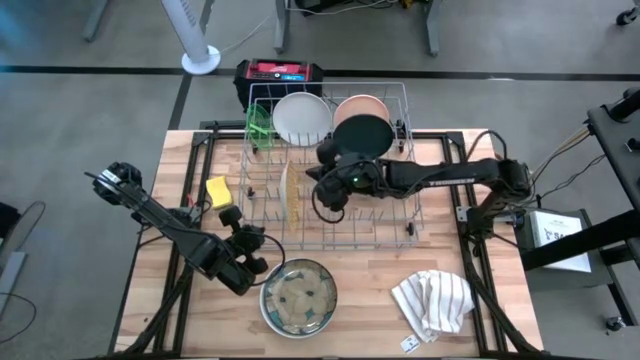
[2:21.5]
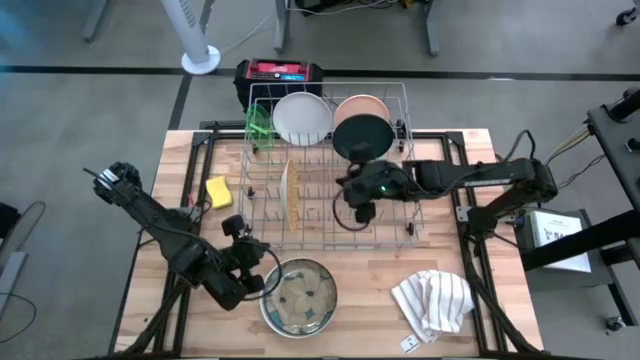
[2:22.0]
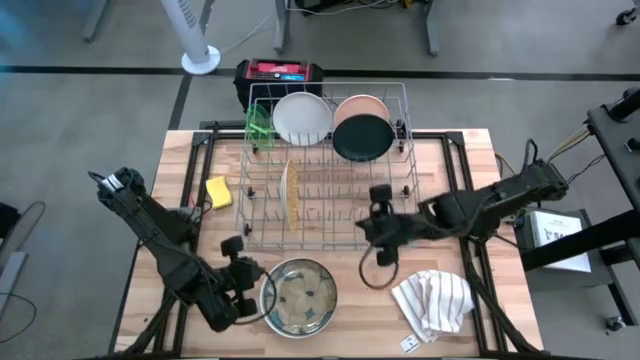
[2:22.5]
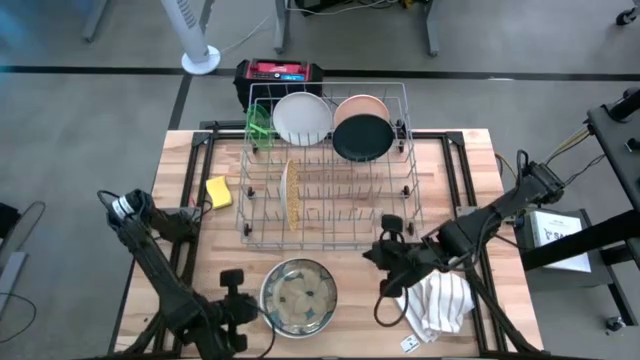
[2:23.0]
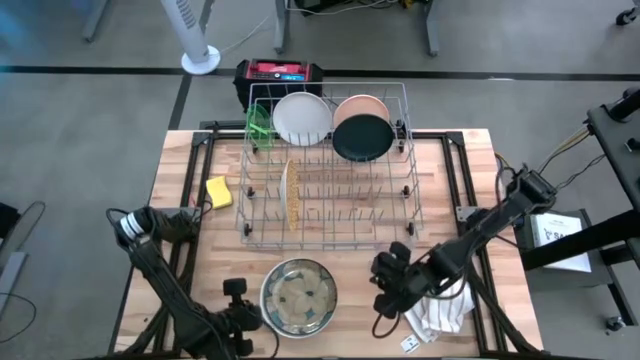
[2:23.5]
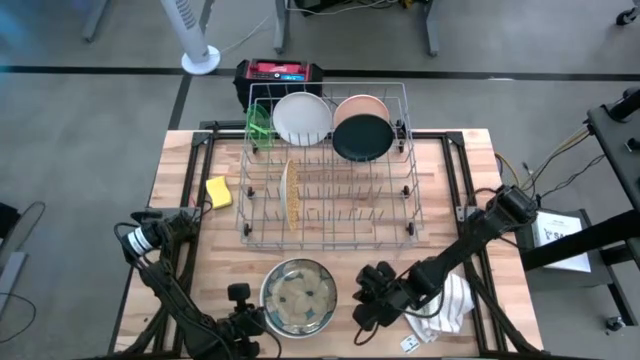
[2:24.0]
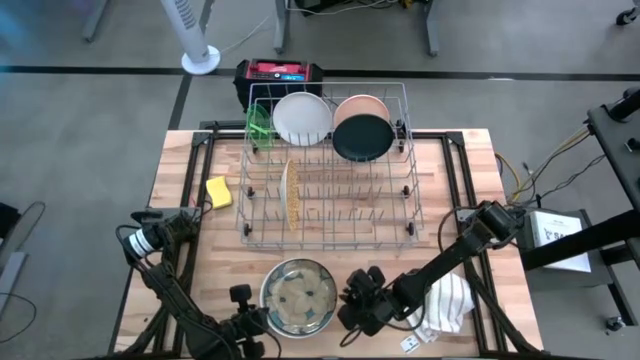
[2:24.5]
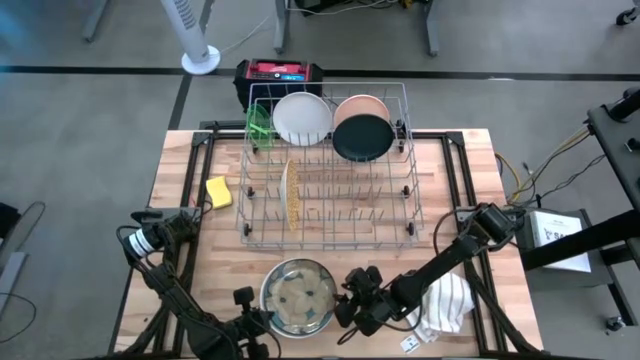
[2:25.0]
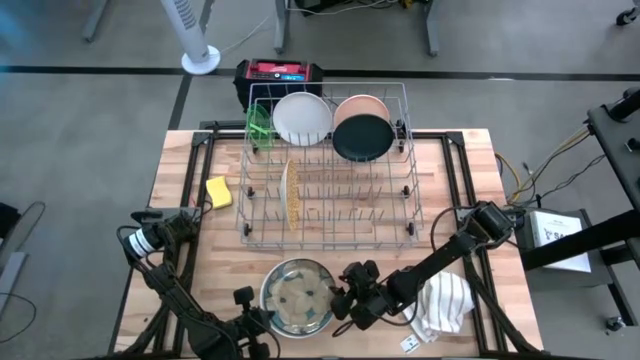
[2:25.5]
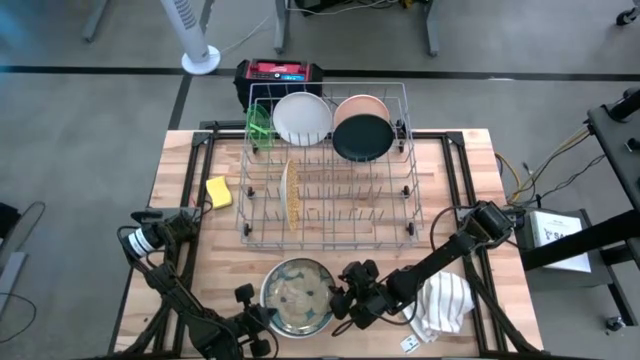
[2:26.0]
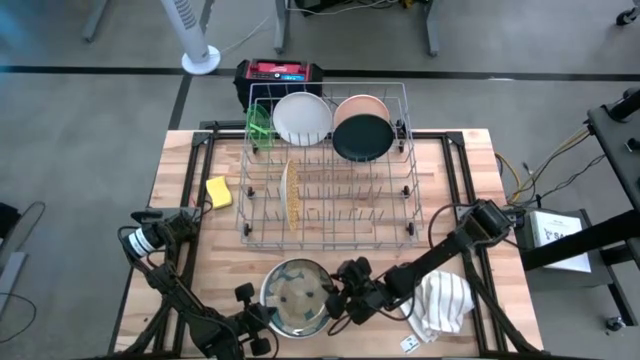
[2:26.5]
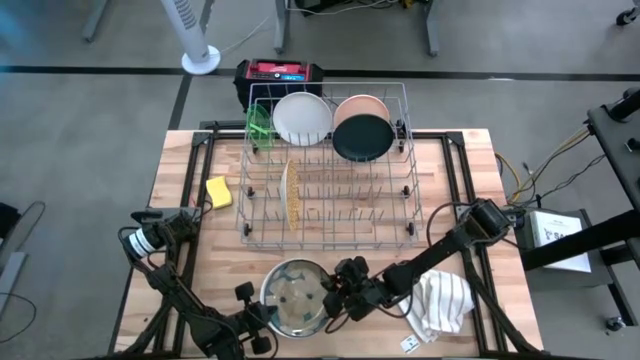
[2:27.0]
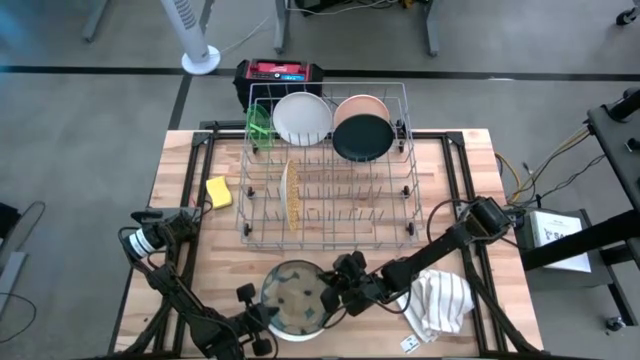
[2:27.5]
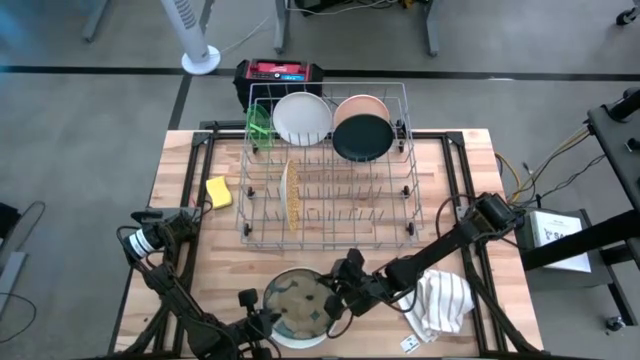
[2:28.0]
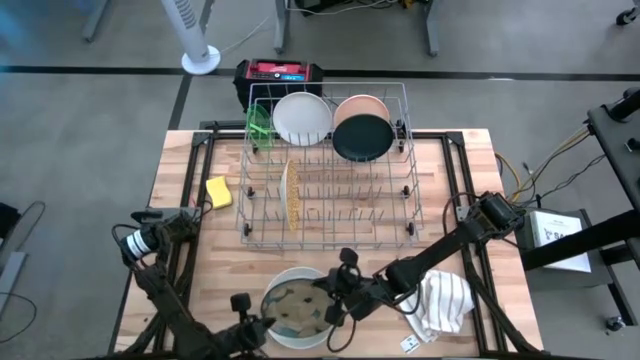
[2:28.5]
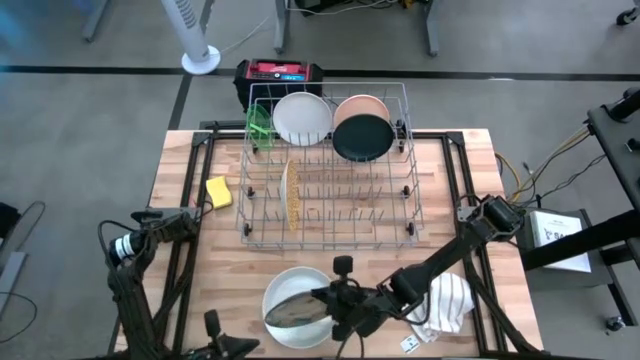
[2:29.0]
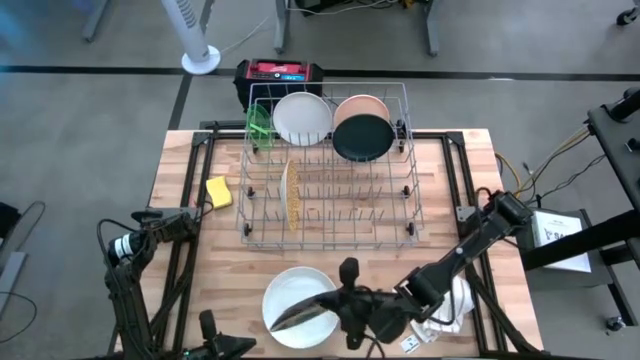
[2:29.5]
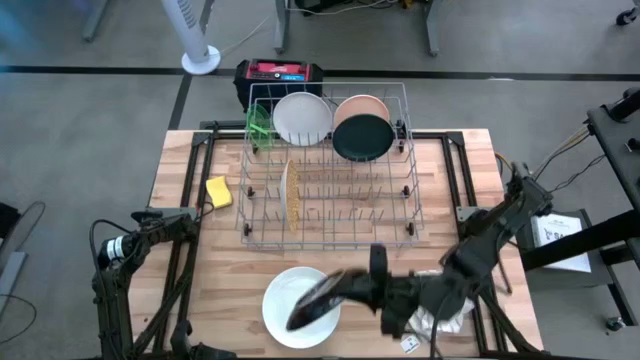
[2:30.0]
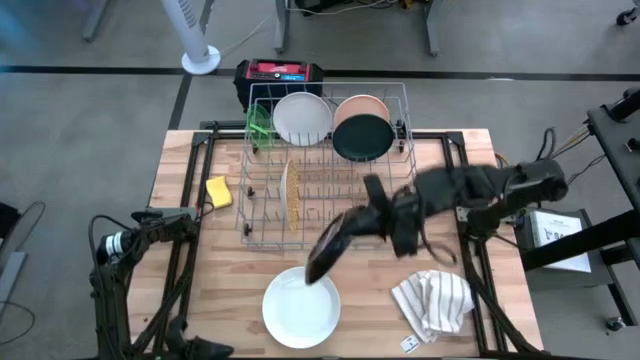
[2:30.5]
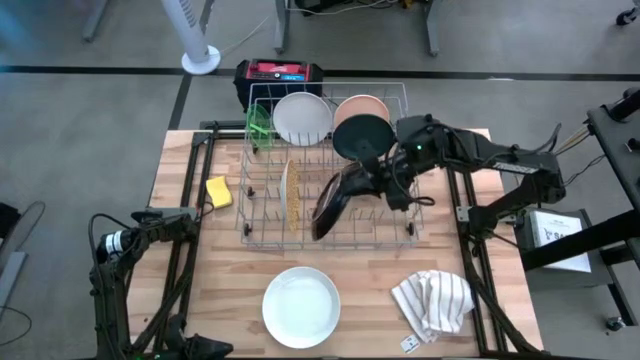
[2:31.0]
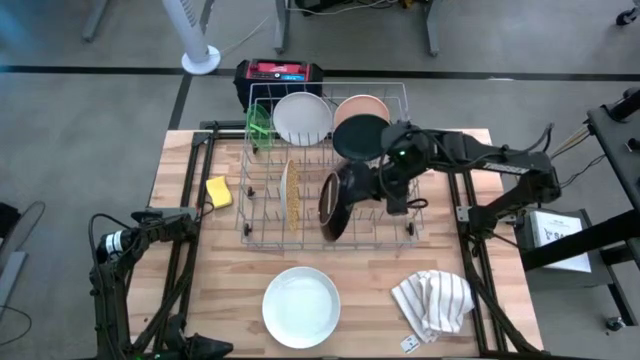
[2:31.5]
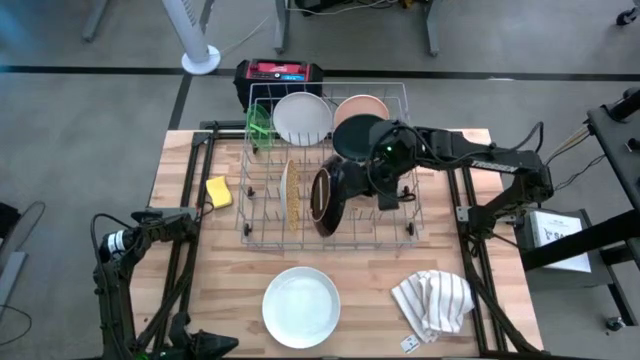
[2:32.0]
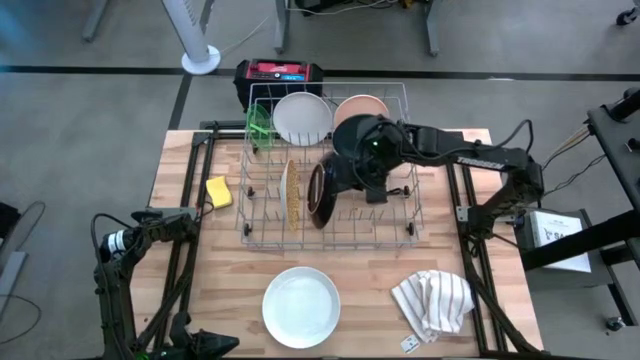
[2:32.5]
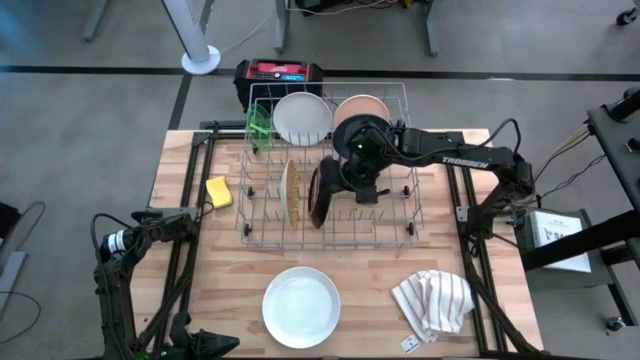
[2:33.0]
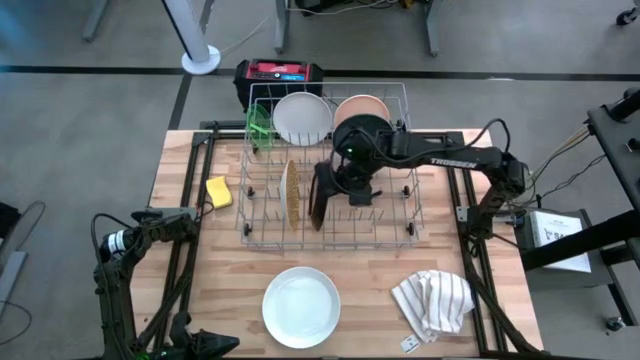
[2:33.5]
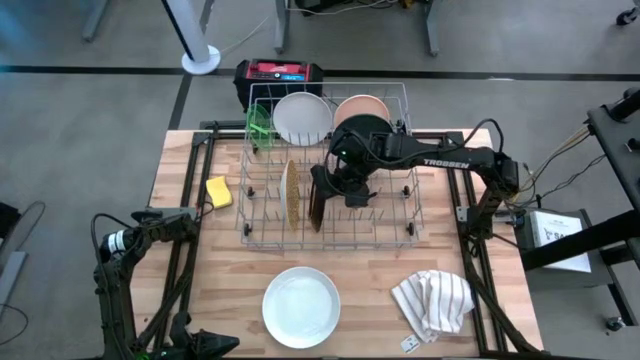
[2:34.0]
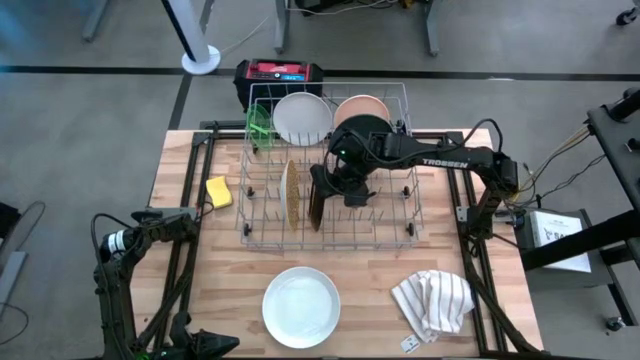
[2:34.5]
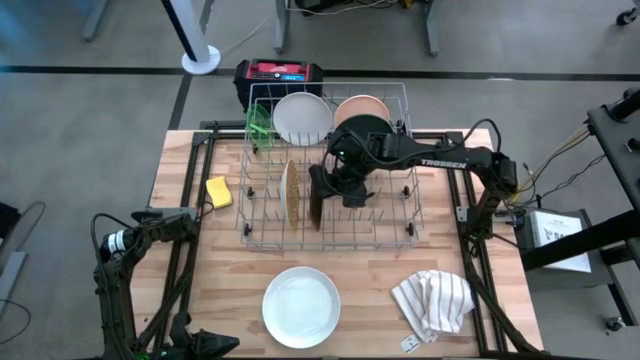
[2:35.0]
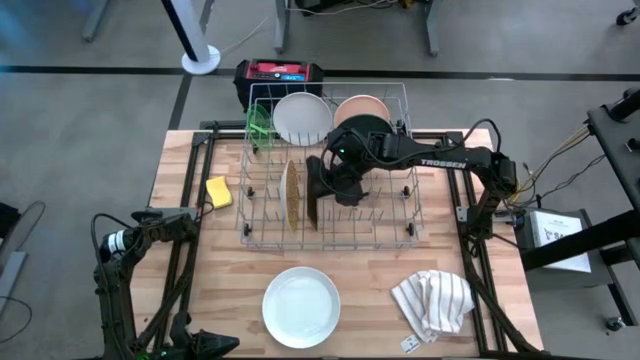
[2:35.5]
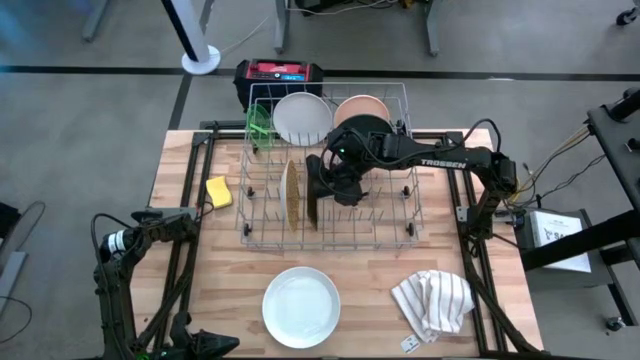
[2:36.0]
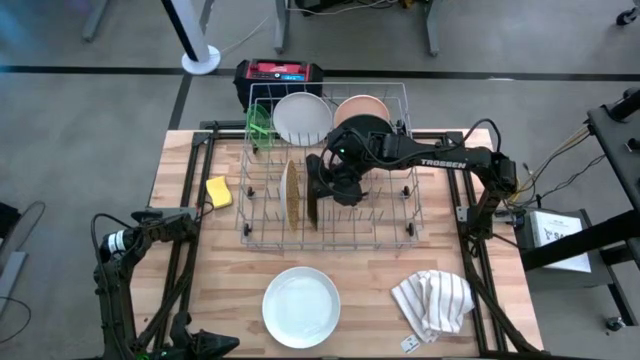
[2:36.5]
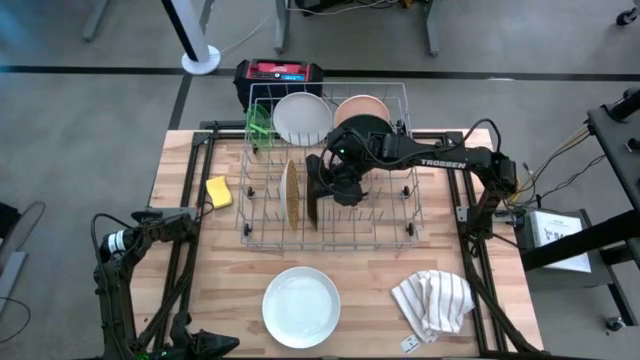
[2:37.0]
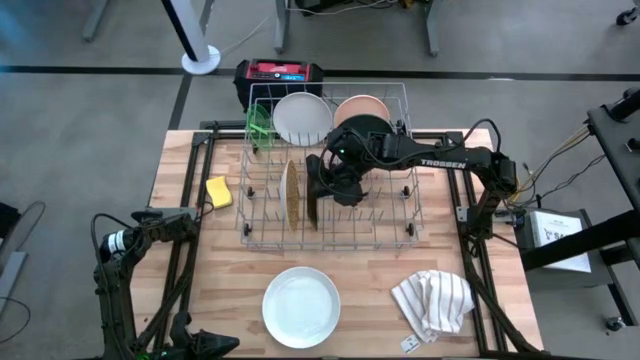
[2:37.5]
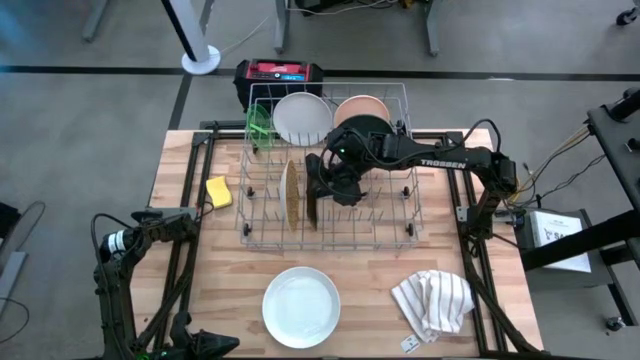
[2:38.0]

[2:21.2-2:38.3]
Task: Sort dishes
Put the brown plate into the dish rack

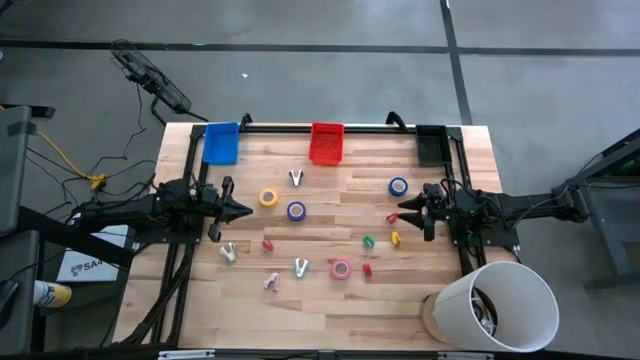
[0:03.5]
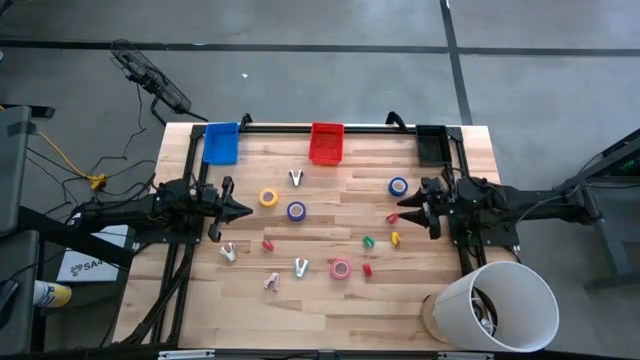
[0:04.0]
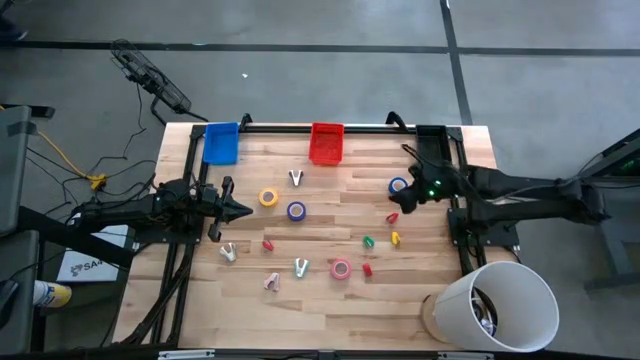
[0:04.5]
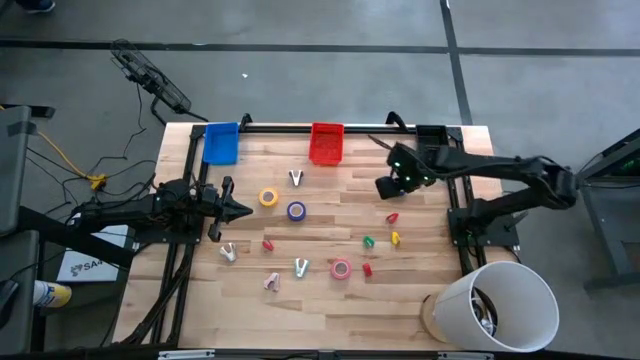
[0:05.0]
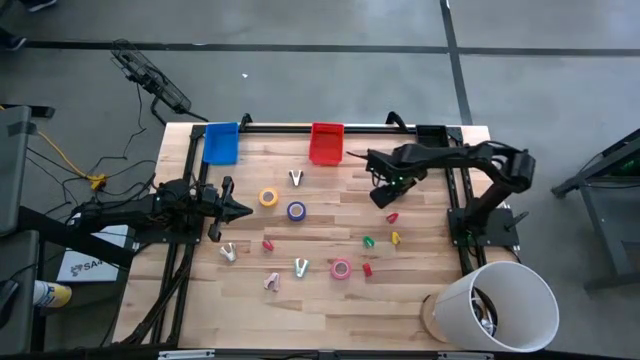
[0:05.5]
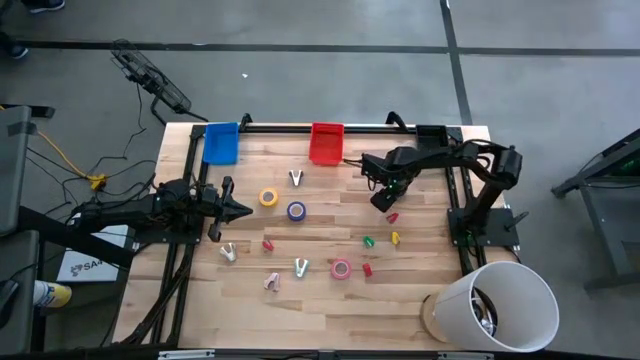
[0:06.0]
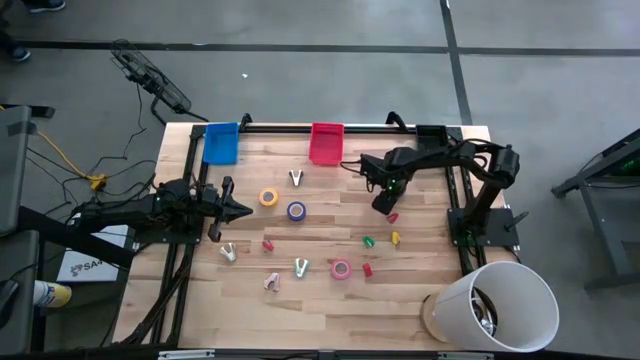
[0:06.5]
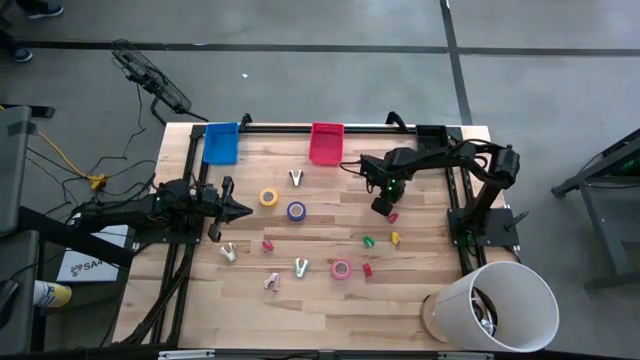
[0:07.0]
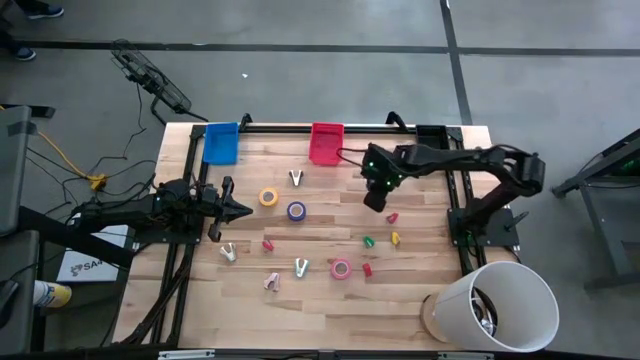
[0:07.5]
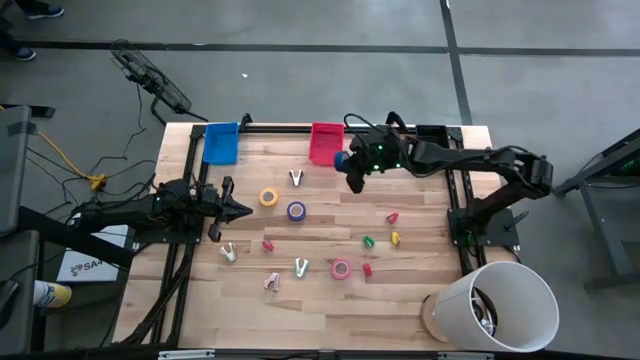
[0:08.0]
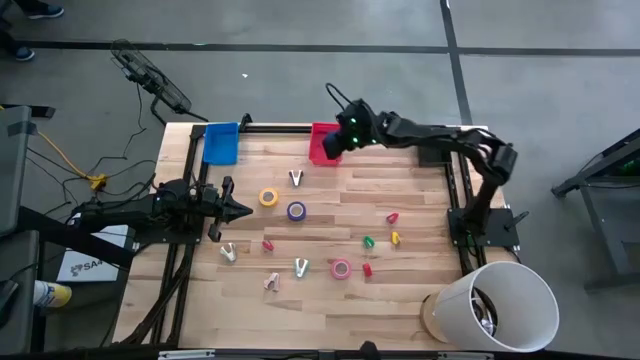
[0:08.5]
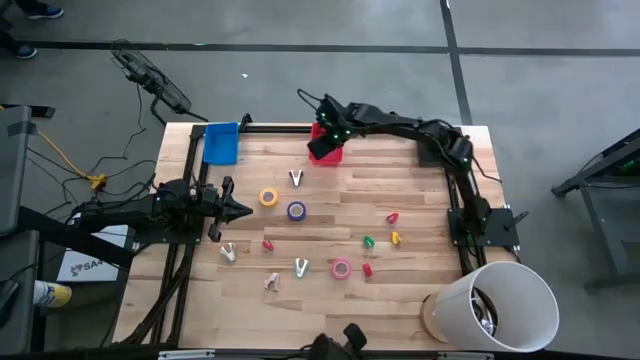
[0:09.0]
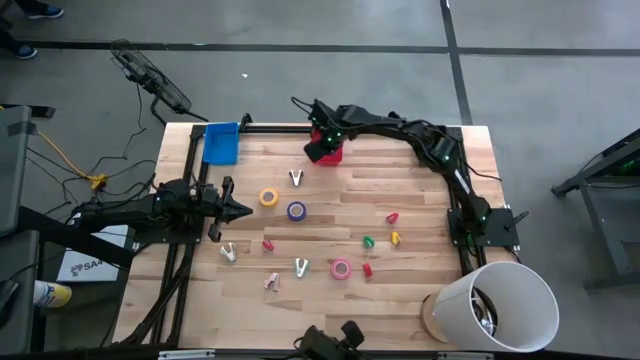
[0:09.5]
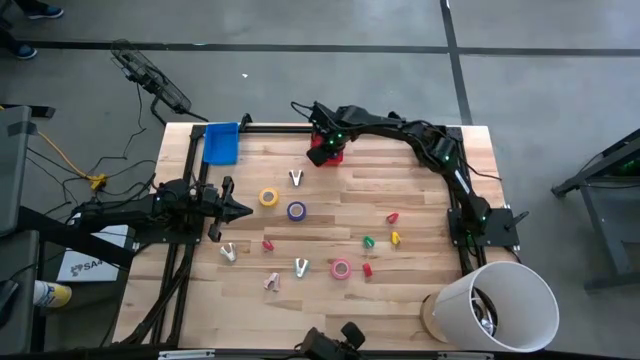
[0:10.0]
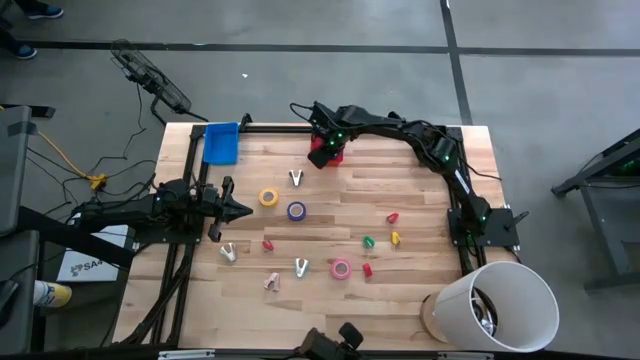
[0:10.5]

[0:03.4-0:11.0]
Task: Pick and place Stapler, Stapler remover, tape
Put the blue tape into the red bin
